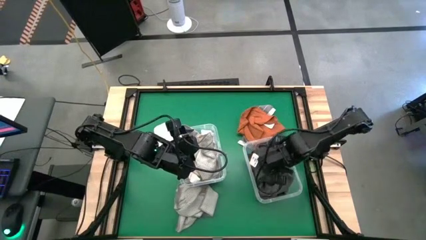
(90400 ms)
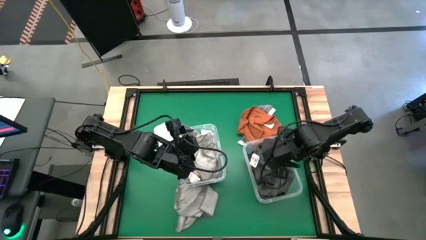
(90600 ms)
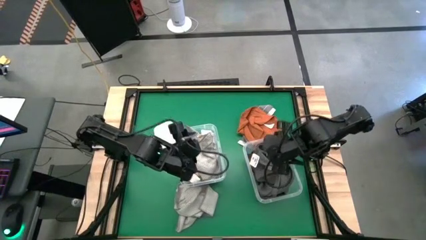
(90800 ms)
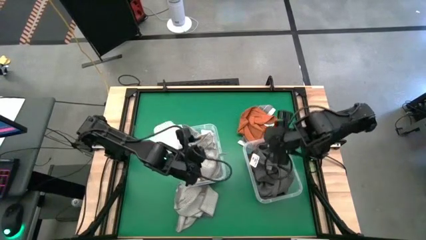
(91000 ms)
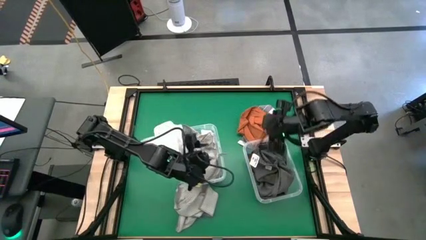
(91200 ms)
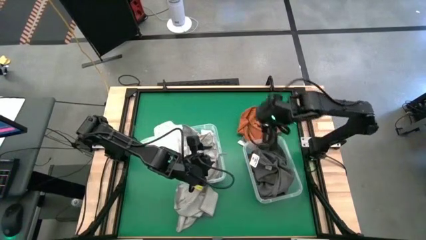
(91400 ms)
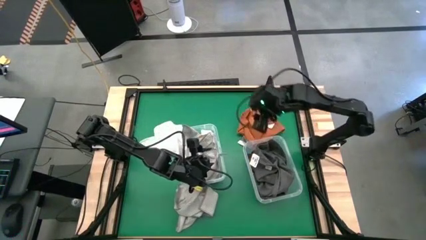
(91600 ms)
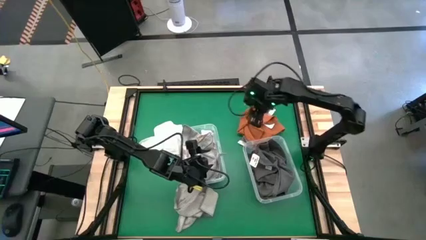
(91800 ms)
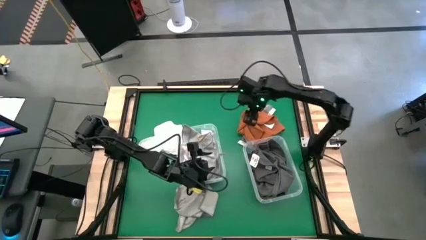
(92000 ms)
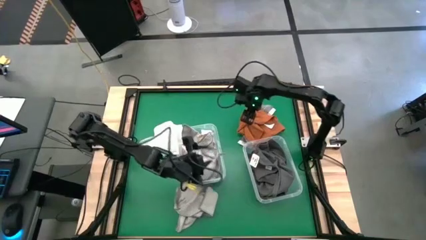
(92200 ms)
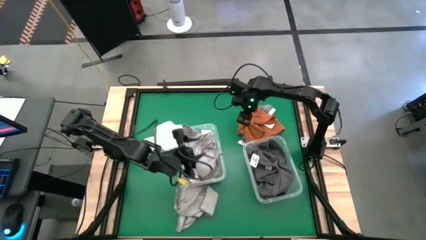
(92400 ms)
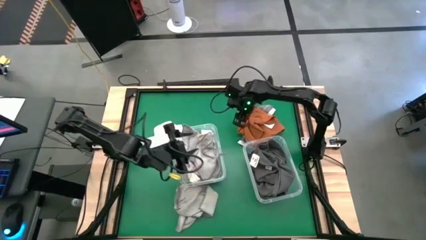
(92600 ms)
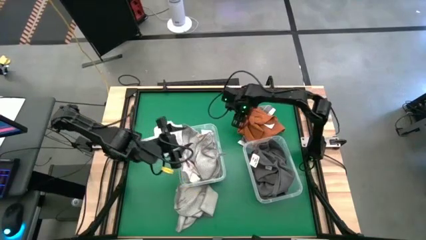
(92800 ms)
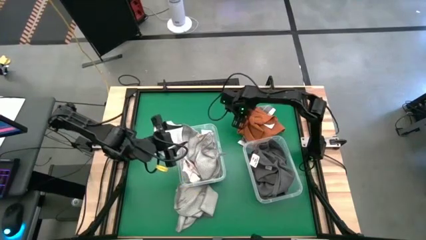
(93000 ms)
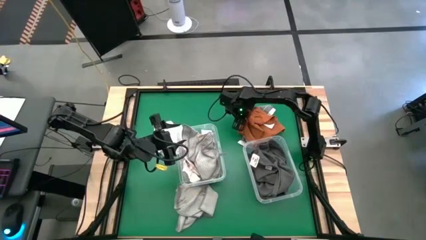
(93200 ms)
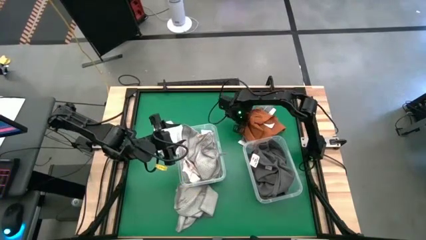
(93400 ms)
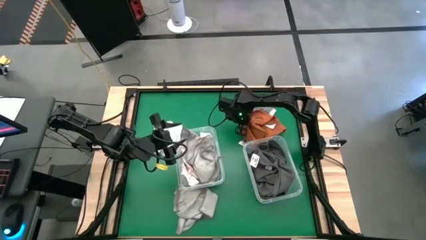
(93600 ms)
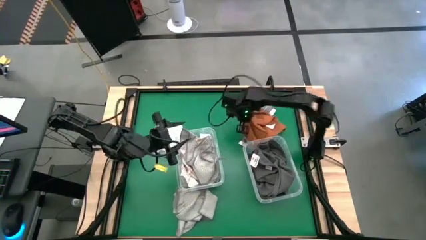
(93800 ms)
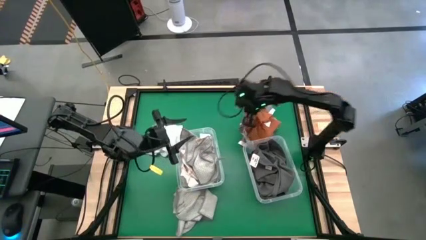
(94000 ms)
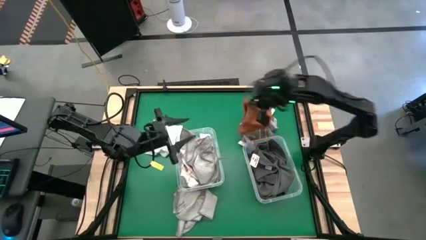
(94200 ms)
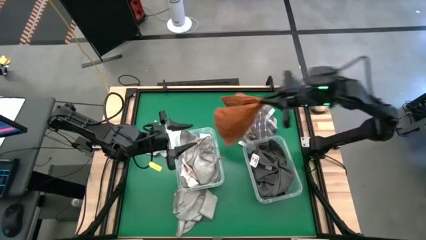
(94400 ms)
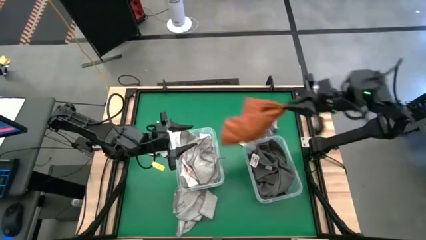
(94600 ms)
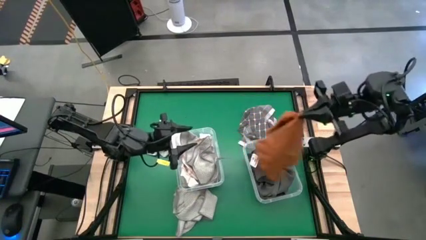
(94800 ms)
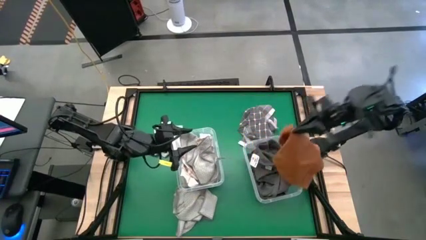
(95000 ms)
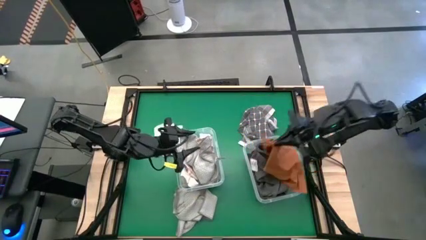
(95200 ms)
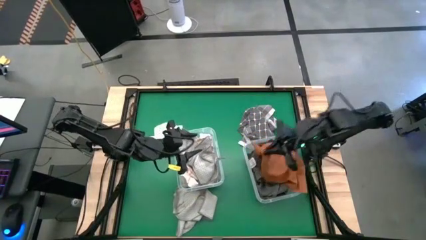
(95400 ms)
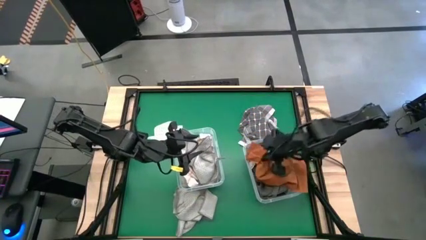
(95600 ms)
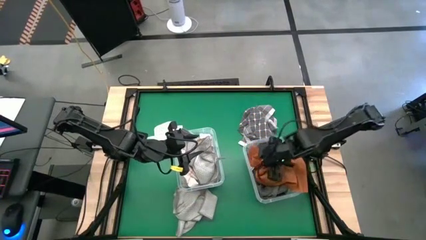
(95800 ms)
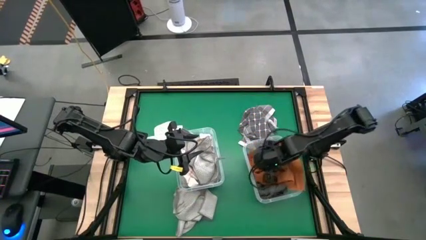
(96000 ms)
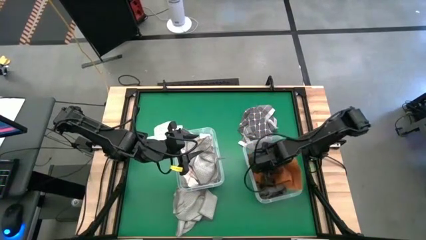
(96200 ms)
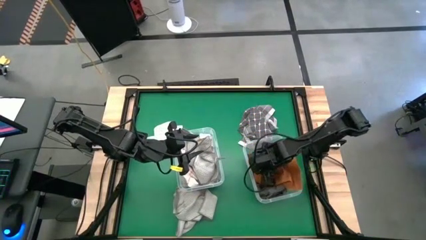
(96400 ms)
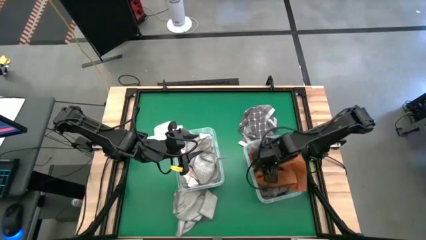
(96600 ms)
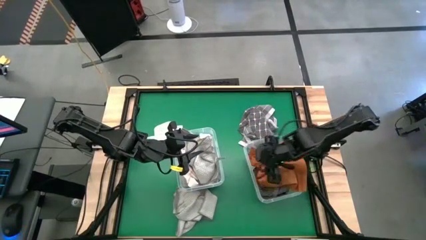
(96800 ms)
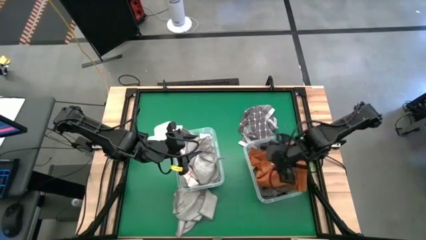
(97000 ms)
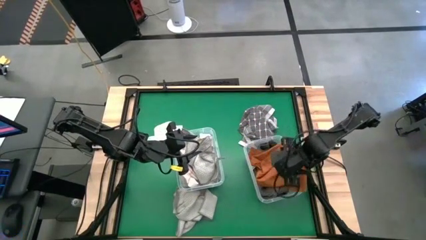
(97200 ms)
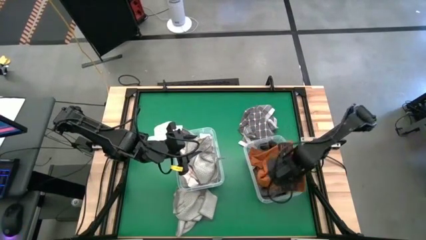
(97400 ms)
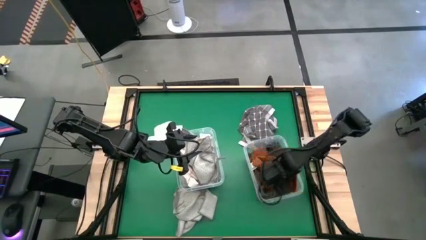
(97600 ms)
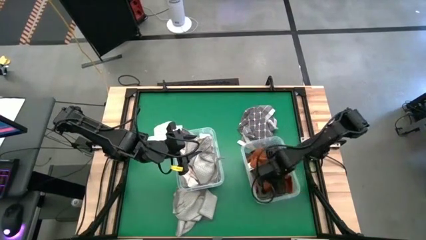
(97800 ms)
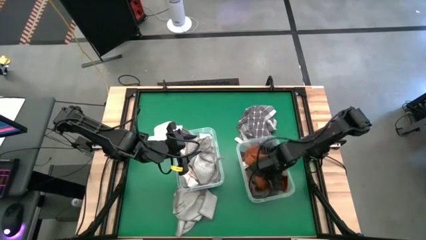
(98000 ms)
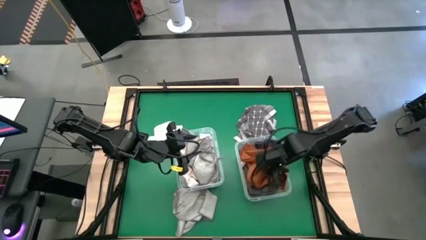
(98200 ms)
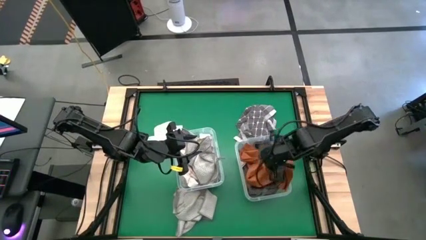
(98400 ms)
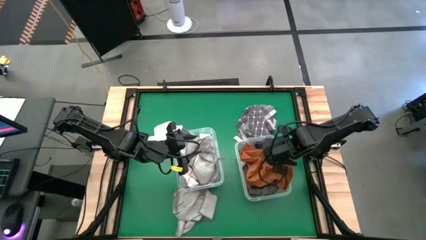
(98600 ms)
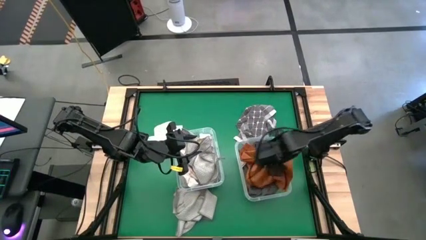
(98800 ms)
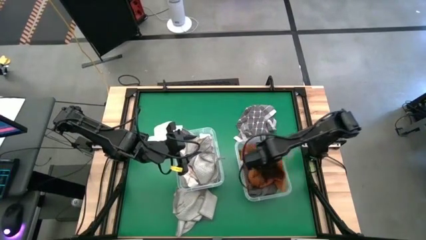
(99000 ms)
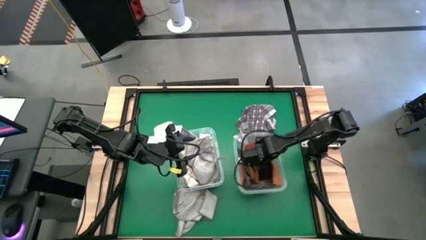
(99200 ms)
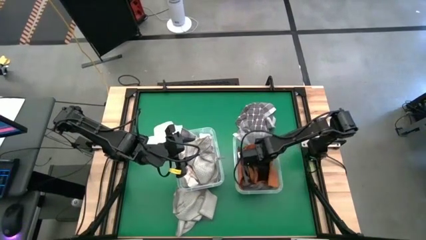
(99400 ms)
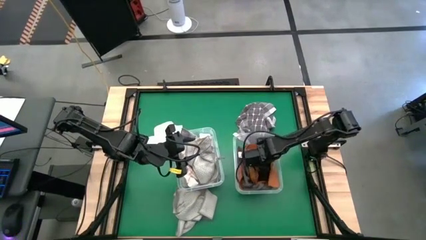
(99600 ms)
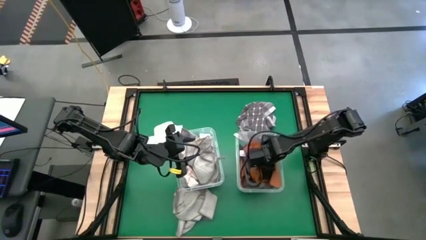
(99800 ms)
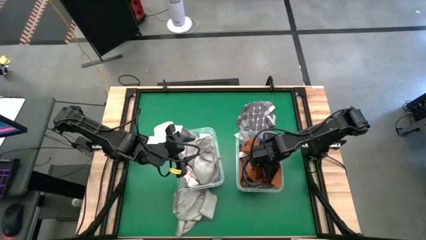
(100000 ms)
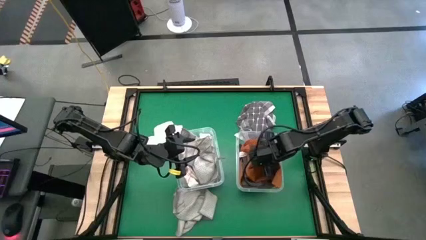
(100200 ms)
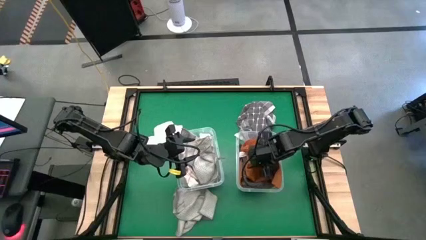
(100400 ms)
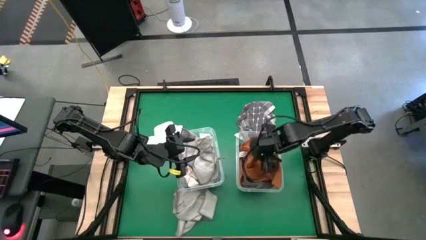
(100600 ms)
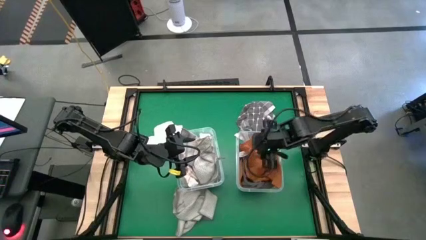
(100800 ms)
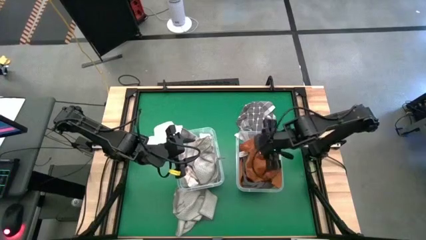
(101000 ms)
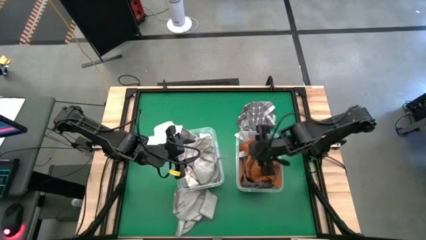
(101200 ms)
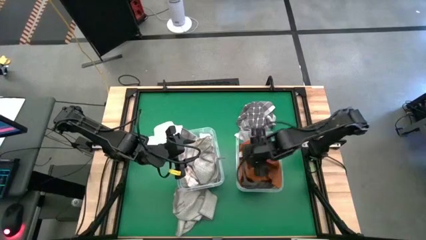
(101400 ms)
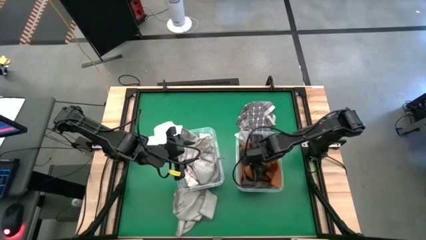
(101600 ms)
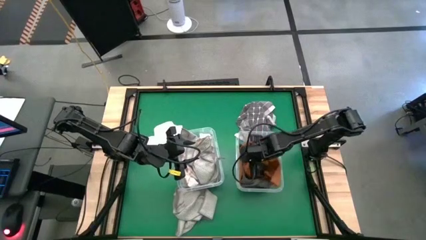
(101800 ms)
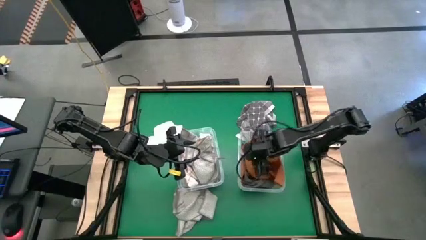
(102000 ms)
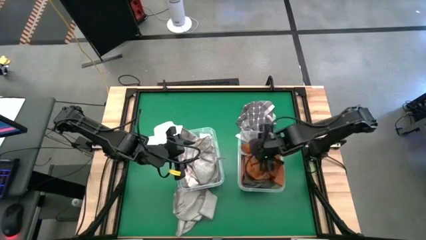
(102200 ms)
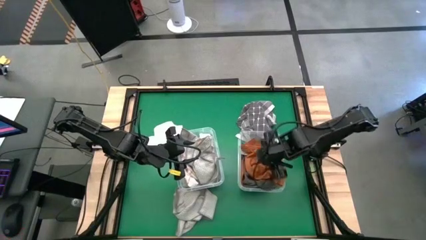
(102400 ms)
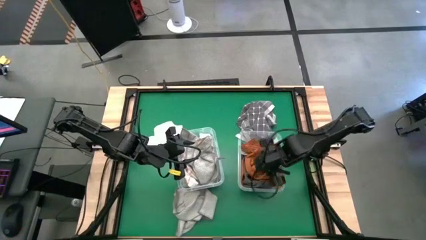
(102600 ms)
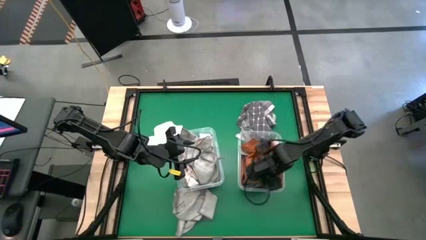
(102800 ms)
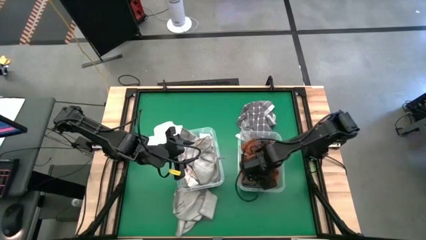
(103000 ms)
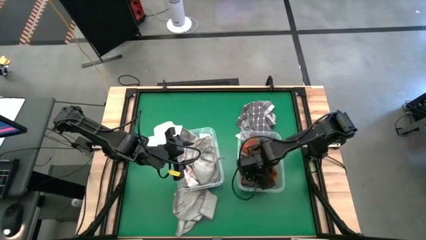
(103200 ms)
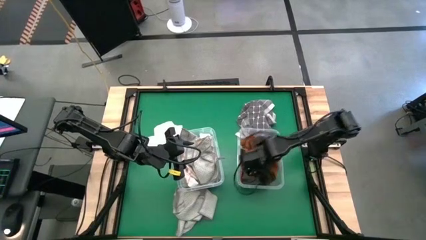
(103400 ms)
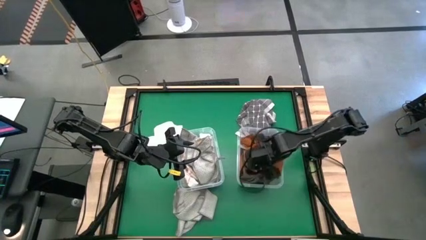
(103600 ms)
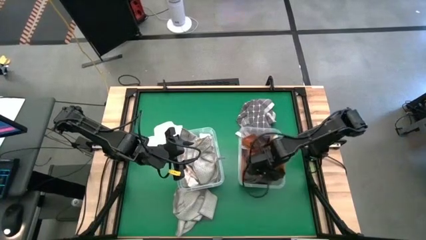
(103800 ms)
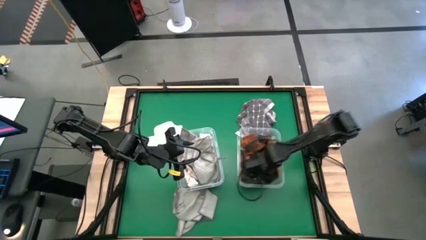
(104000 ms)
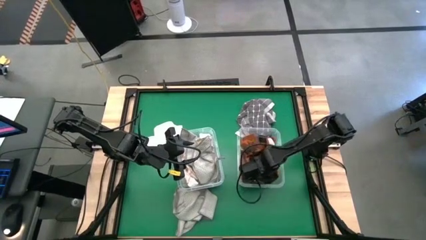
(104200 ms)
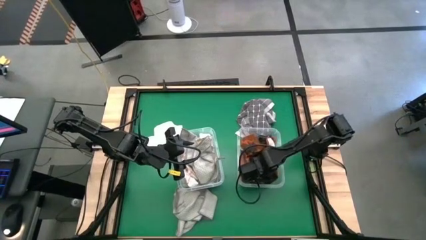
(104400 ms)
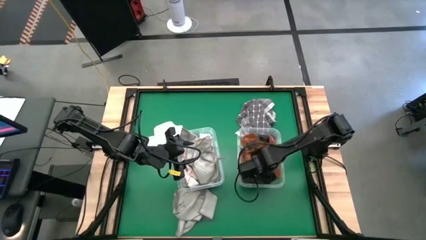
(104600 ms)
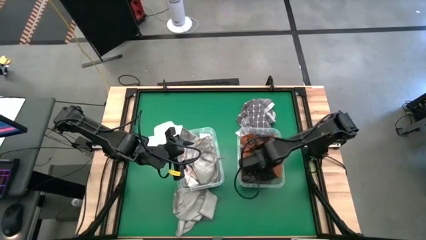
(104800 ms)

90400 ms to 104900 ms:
Task: Sort microfiber towel by color & place in baskets
Put the orange microfiber towel into the right transparent bin
